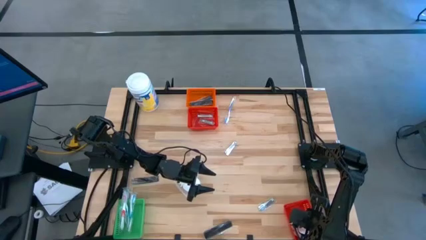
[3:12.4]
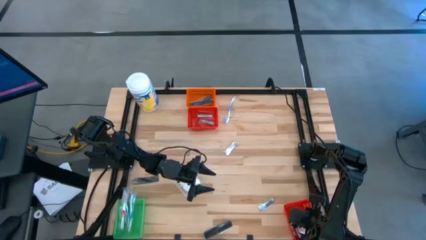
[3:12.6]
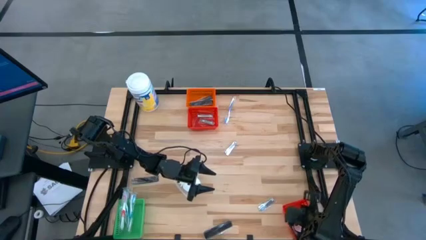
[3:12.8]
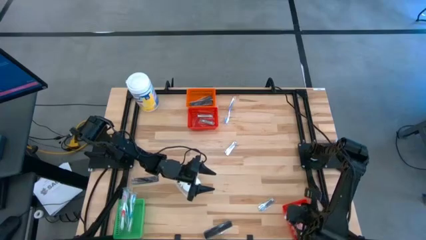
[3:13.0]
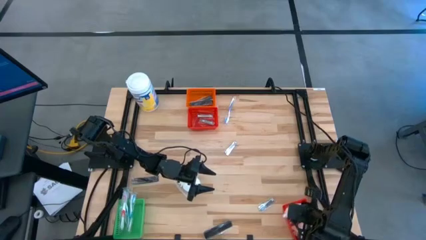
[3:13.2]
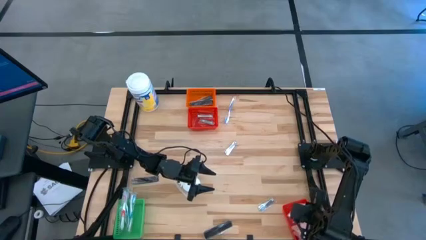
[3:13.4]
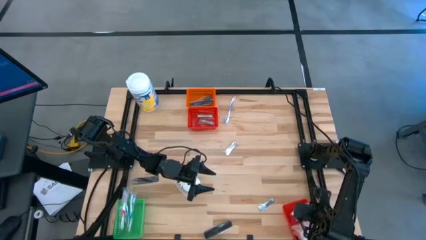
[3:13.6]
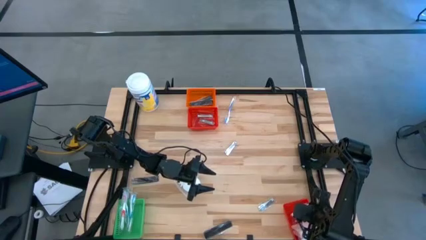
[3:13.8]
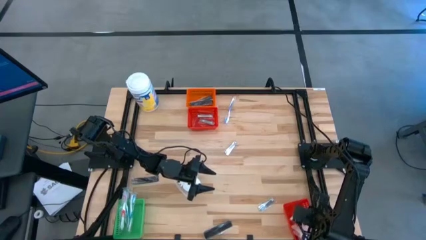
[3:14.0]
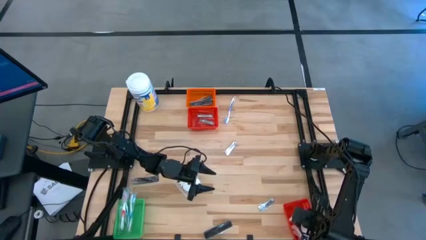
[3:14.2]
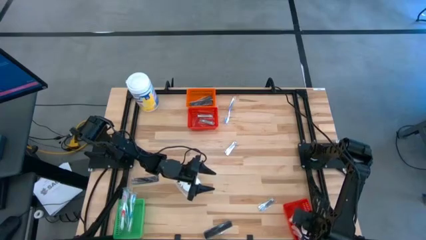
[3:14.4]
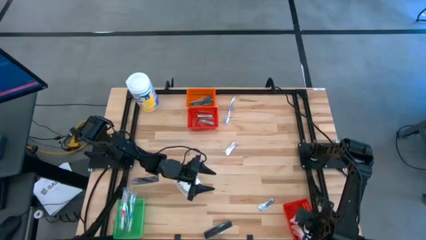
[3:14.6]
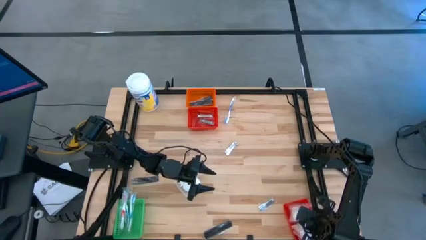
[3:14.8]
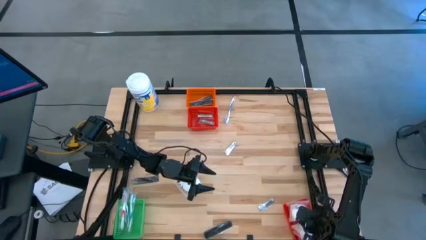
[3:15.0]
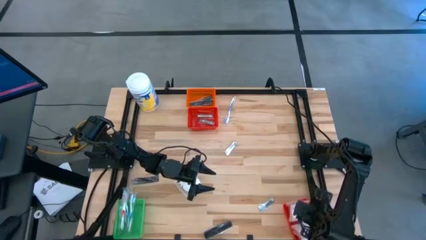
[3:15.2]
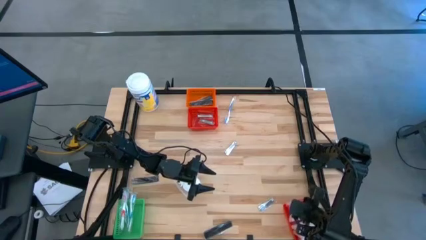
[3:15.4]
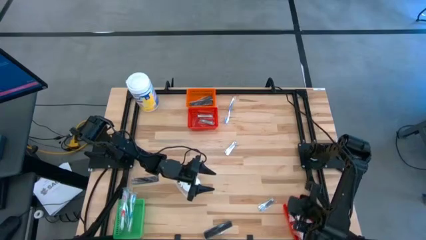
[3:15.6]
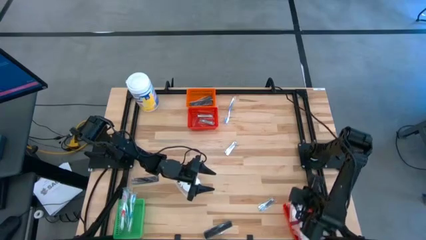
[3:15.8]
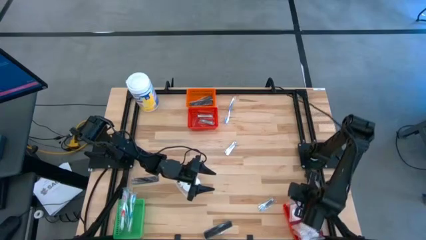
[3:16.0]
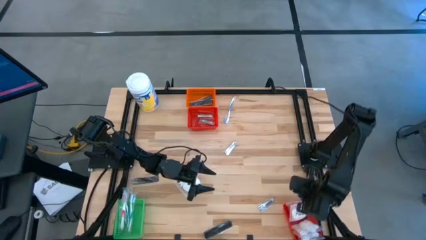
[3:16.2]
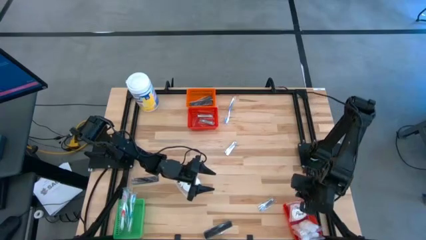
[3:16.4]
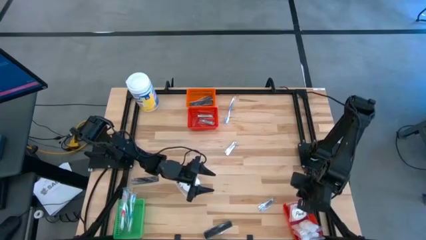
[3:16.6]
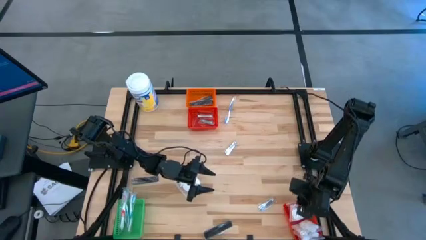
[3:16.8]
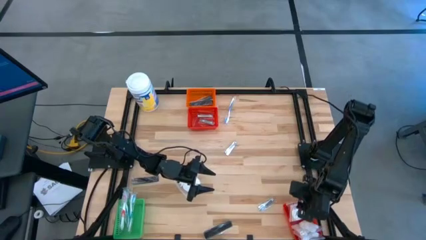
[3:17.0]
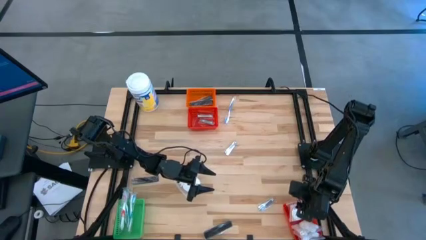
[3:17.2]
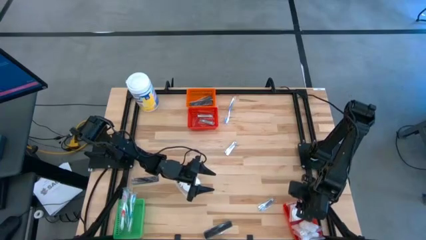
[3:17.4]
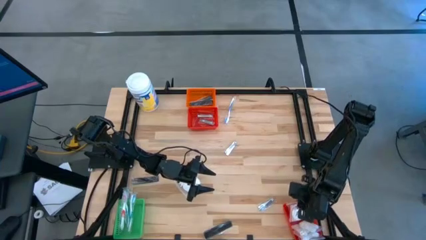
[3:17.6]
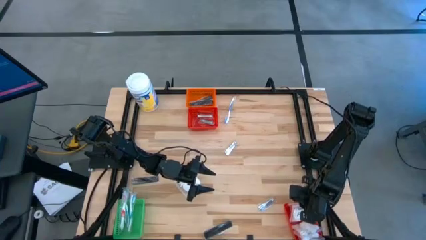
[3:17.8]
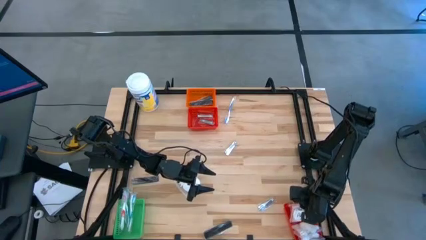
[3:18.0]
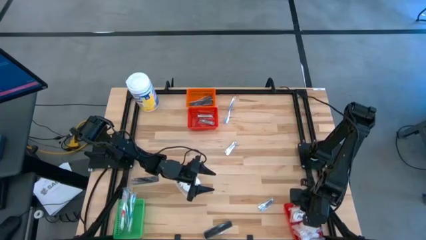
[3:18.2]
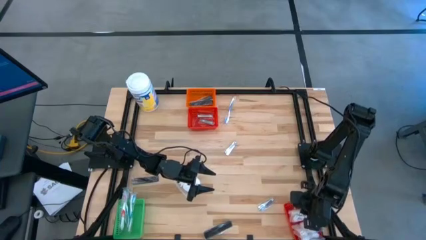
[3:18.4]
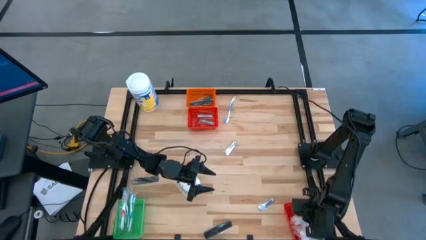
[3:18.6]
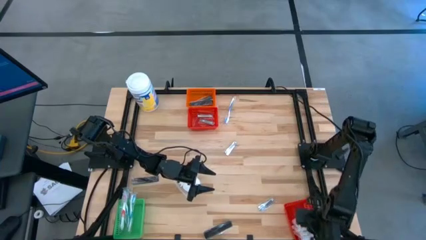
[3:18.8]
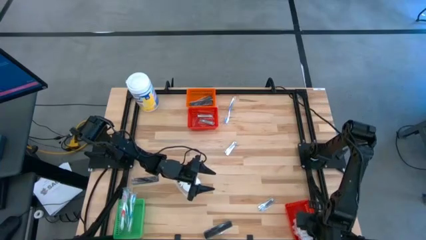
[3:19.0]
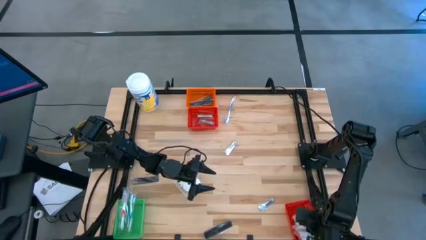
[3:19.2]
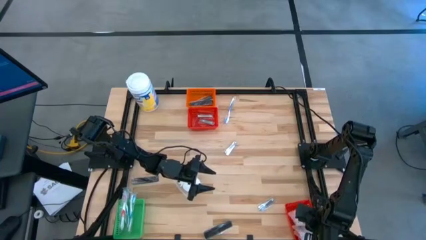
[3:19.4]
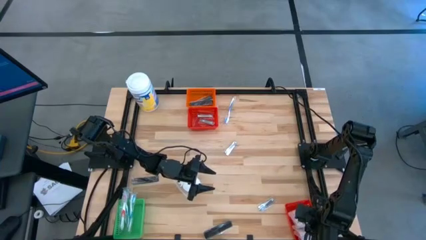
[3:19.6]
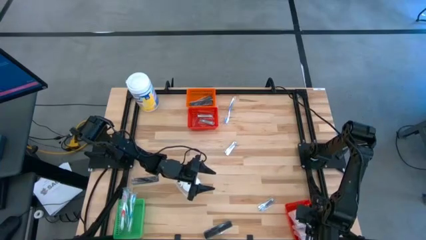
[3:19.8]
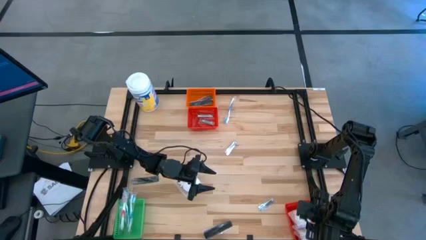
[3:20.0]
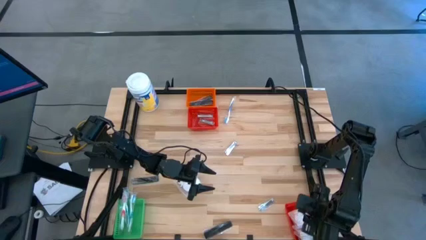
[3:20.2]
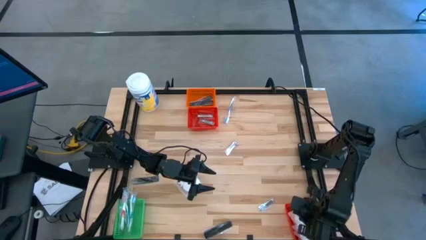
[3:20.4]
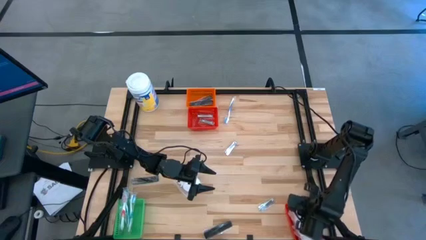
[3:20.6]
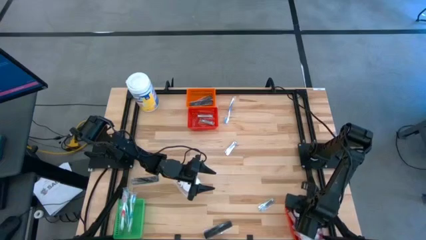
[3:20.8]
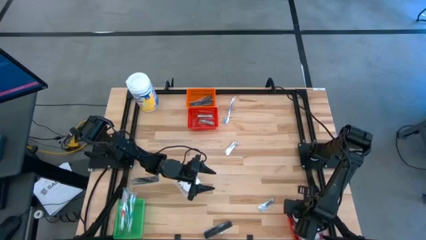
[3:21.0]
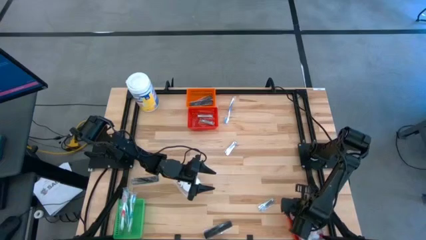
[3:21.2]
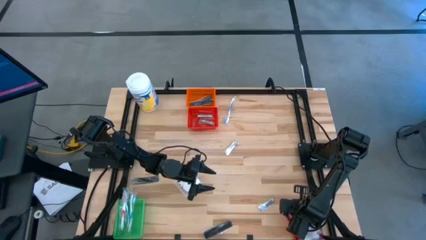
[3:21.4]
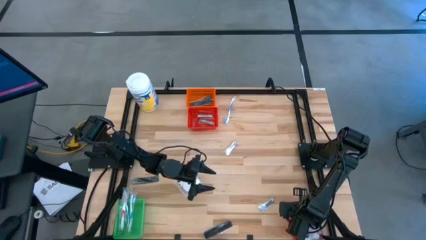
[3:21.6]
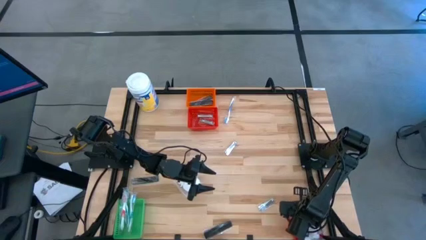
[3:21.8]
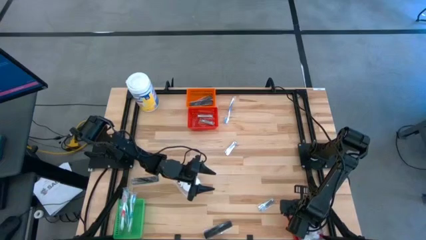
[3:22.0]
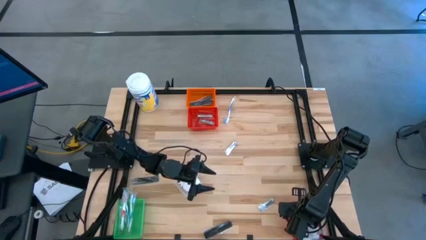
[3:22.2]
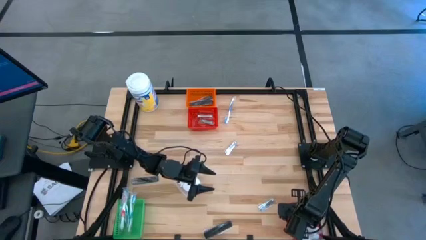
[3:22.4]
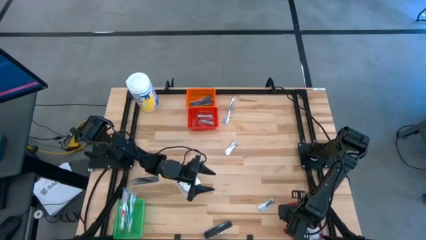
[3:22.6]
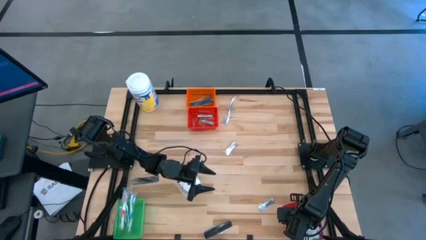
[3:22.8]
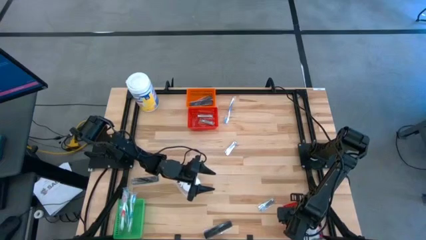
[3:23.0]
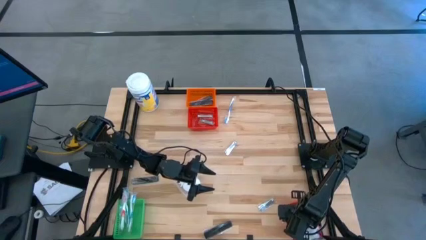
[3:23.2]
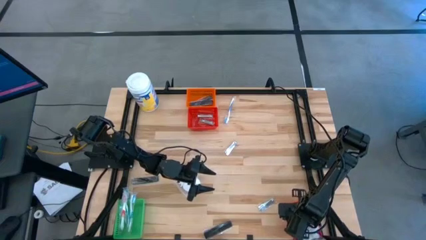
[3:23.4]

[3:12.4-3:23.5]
Task: Pick & Place Travel size toiletries
Put the cotton pack into the bottom red basket

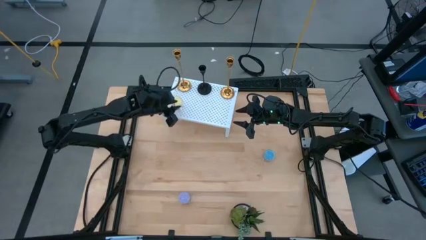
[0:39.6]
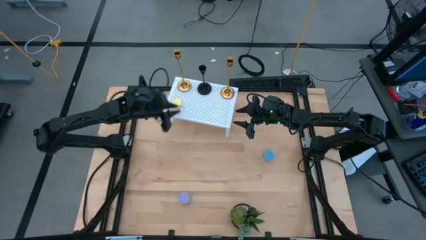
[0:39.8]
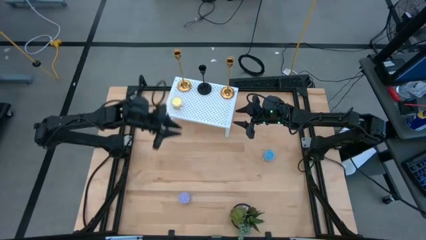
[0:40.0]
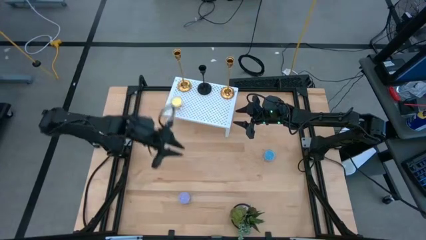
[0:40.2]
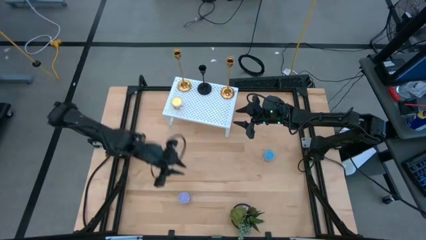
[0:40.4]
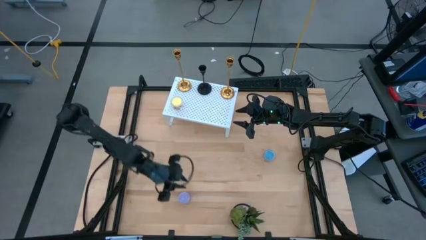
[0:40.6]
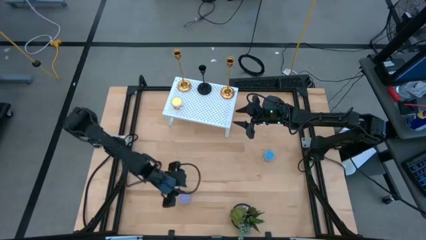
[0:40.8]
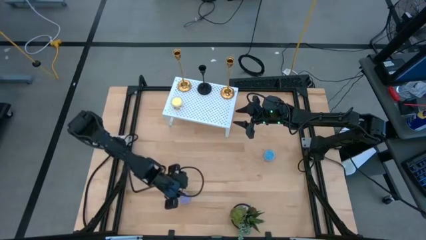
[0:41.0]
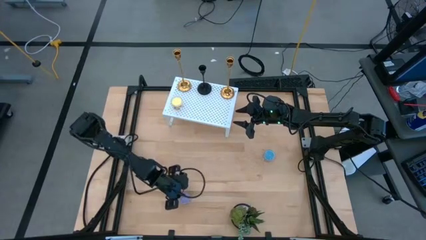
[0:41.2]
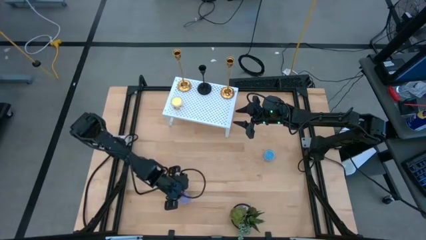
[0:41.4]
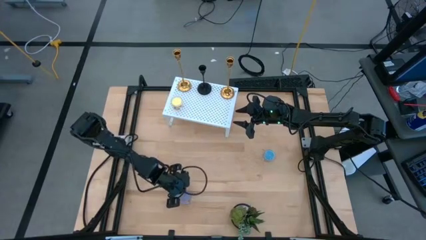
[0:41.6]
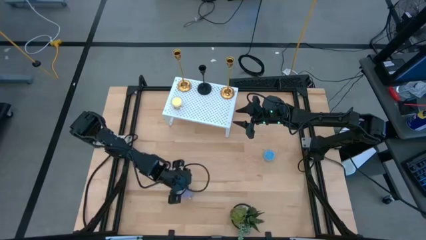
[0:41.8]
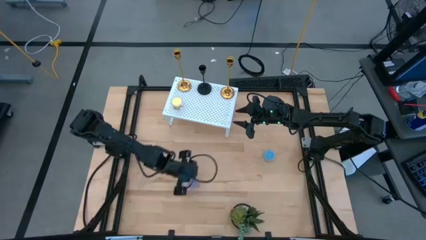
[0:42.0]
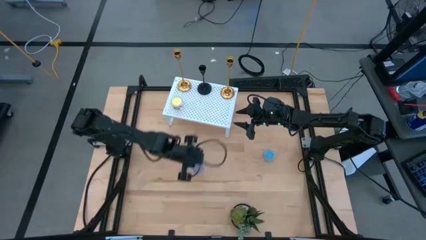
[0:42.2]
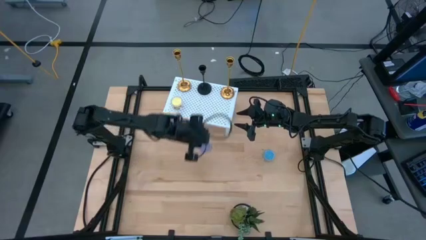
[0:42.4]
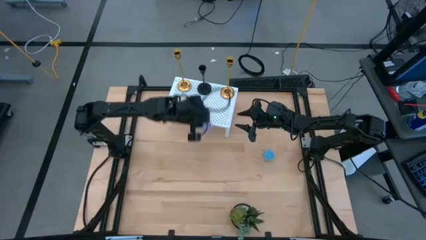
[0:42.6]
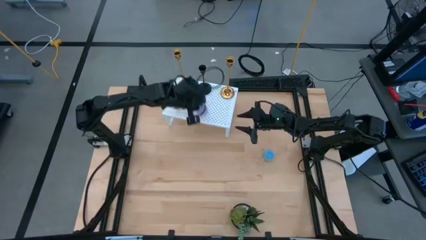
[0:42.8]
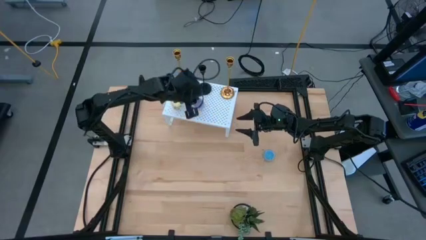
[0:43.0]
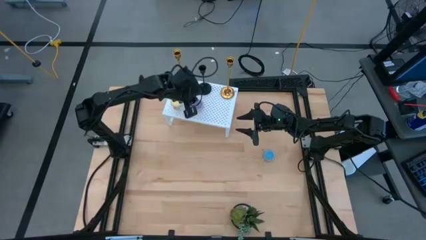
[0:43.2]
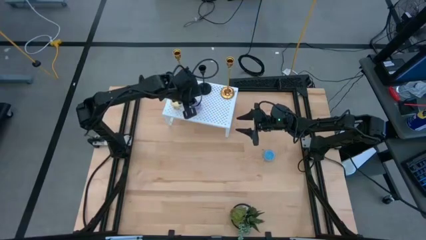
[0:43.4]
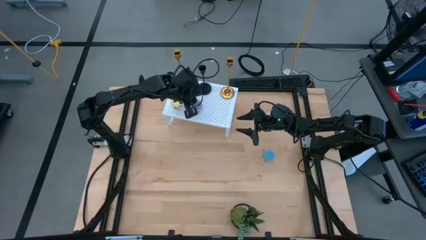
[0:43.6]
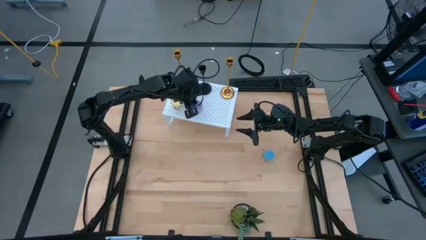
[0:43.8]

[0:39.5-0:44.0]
Task: Pick & Place candle stick holders
Put the violet scented candle on the shelf

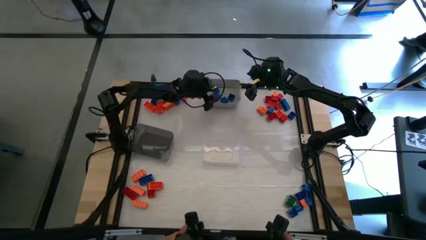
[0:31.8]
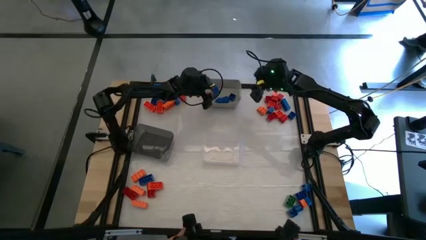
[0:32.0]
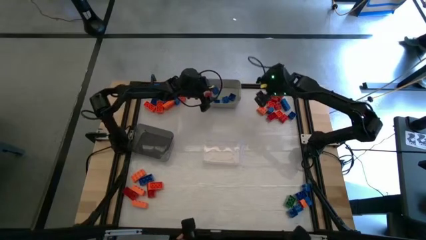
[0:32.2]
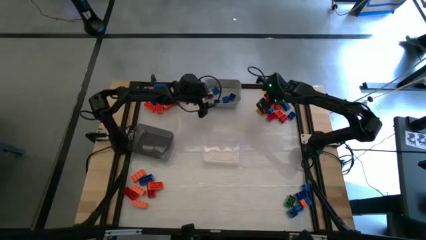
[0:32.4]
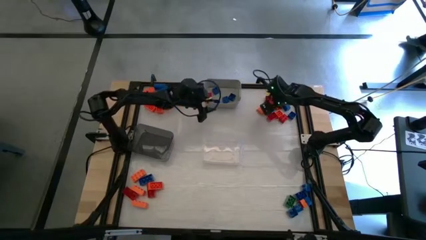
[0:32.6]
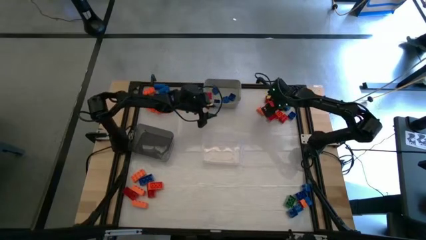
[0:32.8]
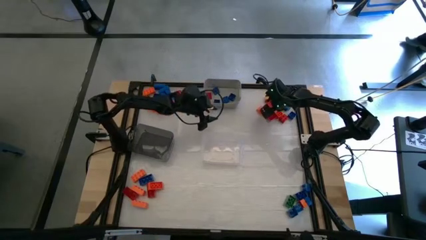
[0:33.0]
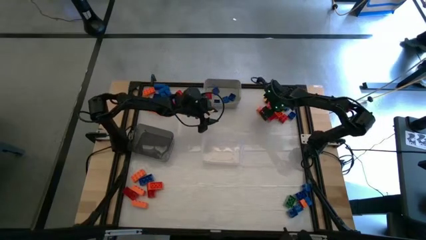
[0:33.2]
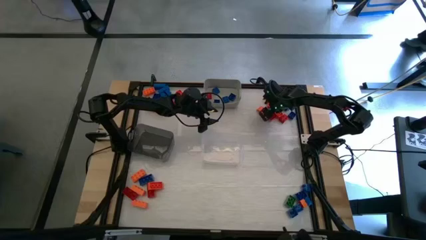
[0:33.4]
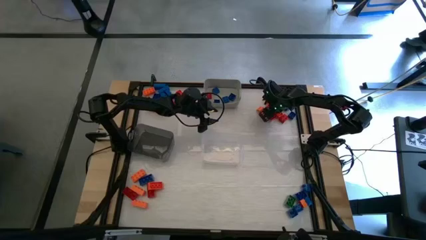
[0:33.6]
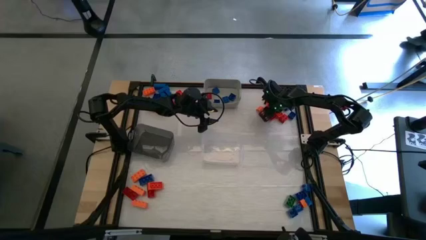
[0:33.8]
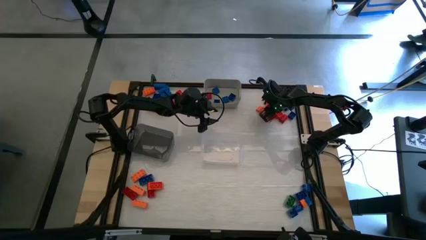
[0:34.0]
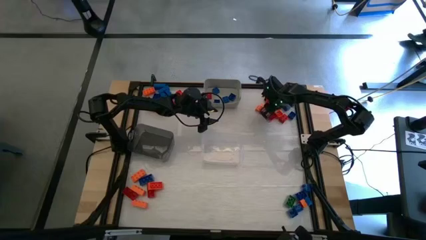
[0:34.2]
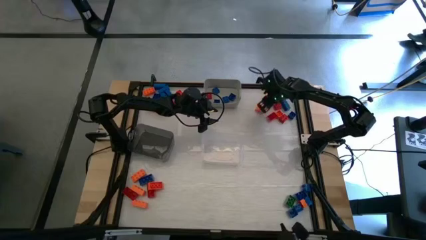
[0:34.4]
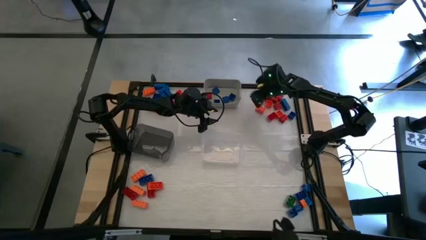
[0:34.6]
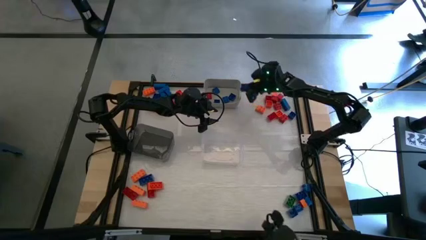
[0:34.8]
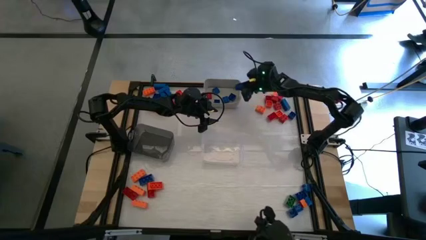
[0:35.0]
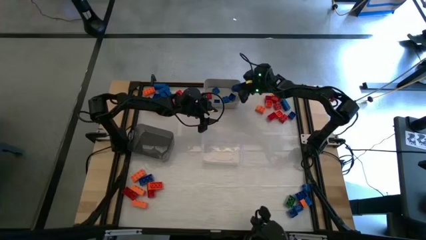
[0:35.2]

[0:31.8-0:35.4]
Task: Sort blocks by size
Put the small blue game piece into the gray bin
